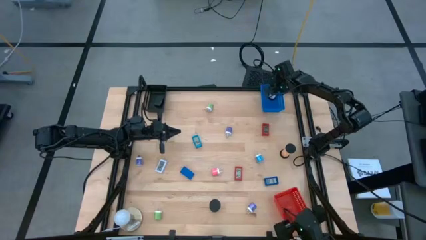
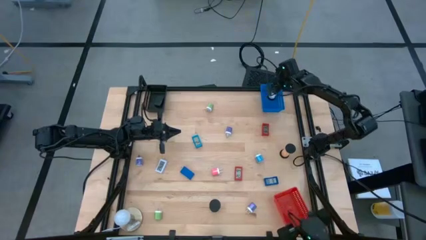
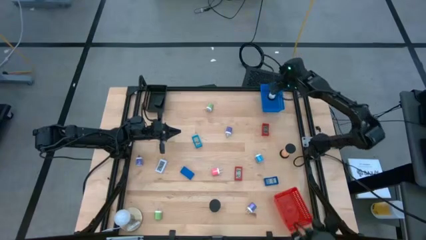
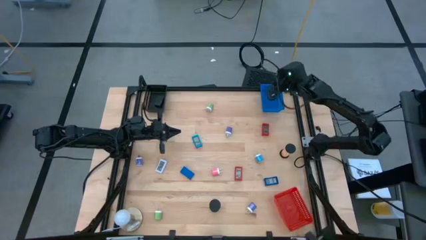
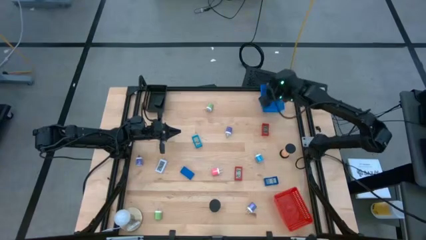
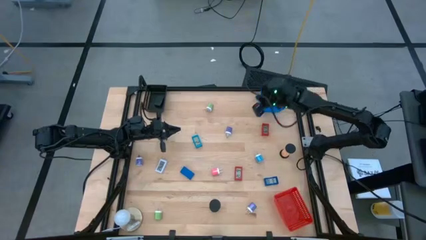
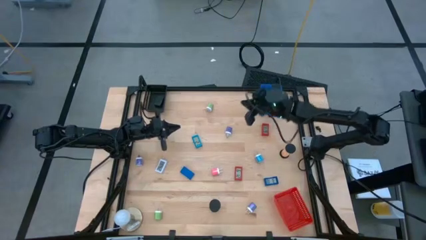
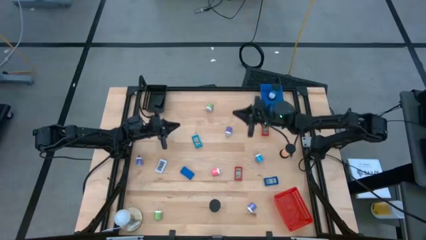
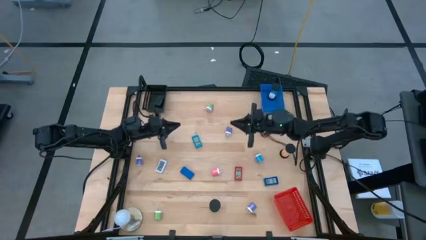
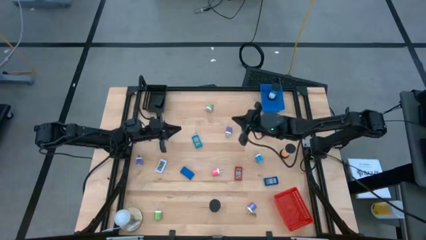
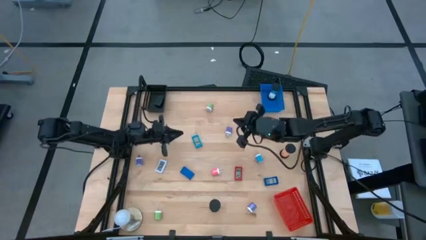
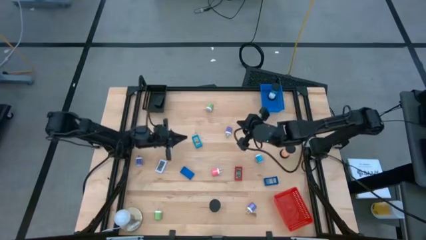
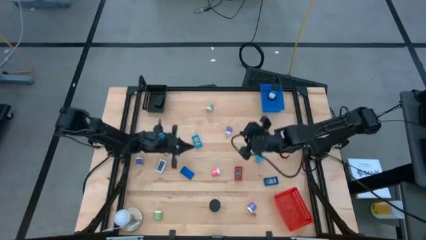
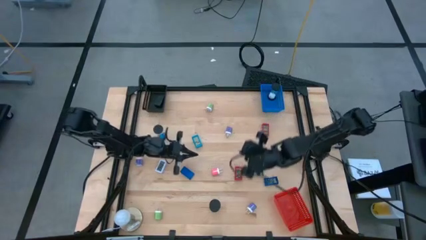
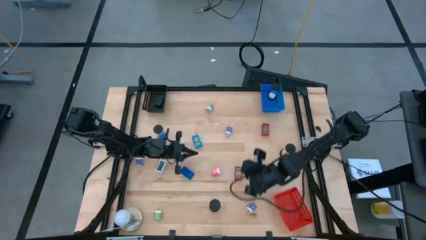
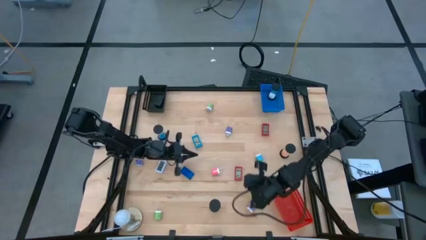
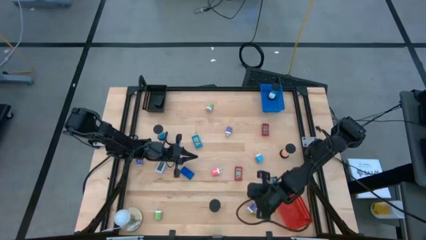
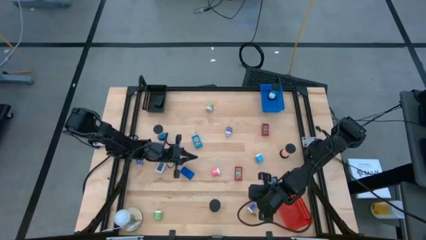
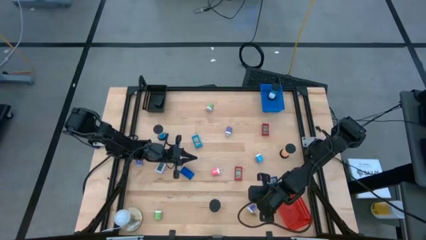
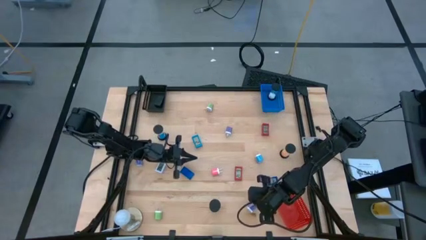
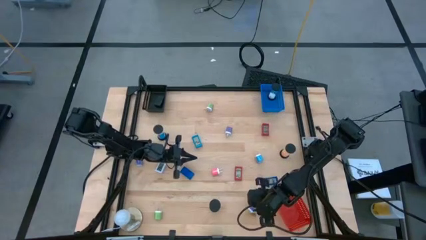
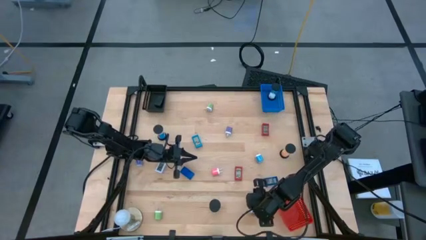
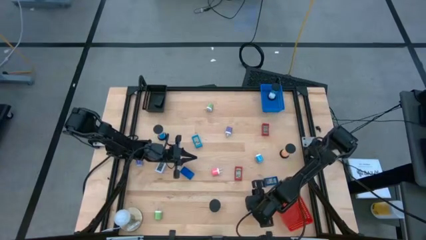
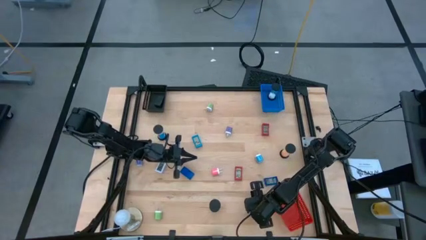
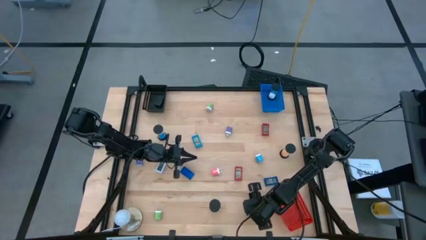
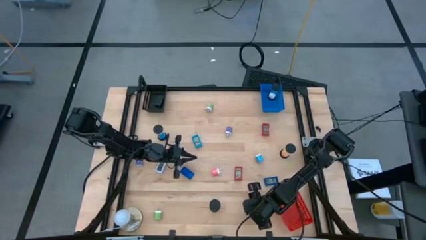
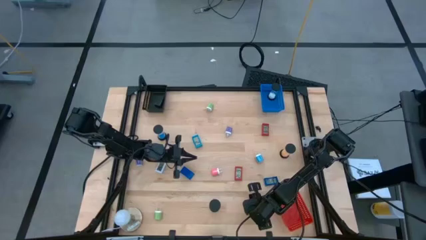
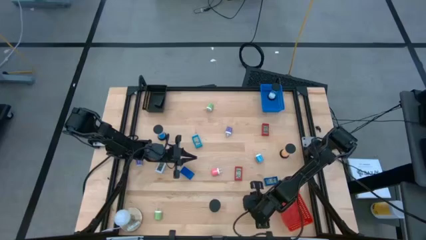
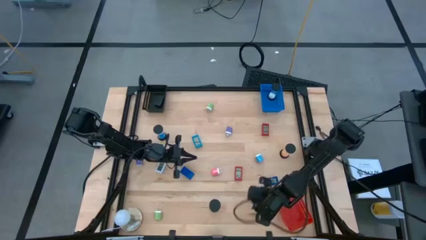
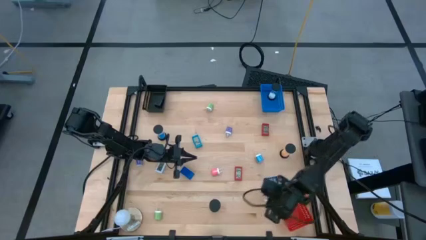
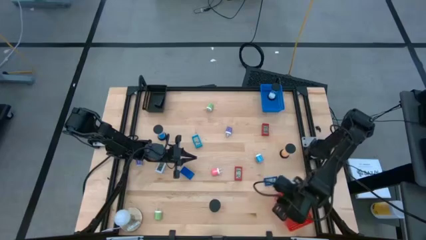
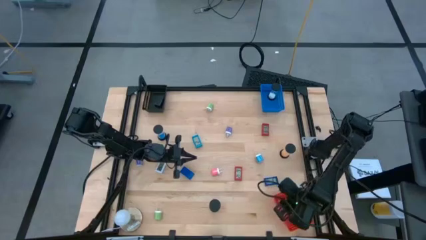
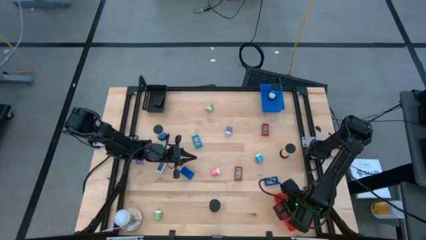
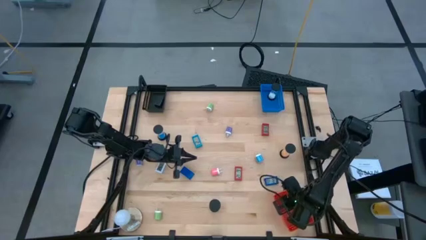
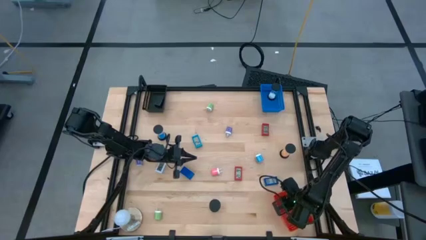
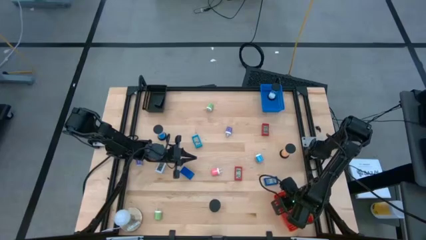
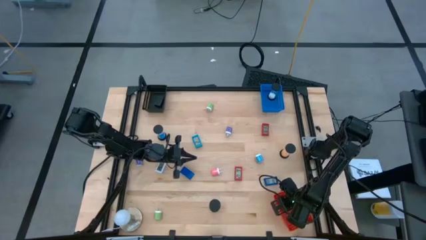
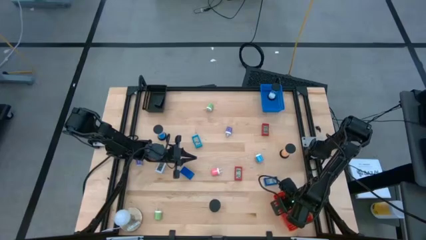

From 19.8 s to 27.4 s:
Task: Pick & Place Office items
Put the bottom right blue charger adapter into the red basket

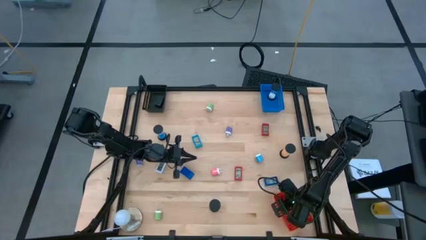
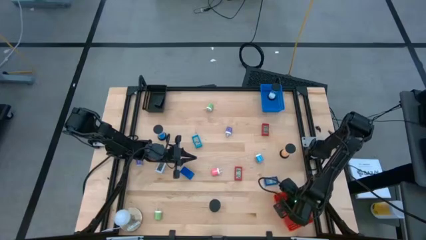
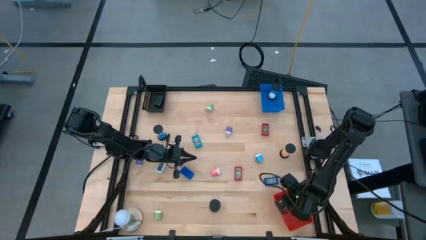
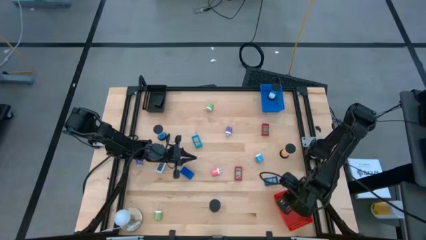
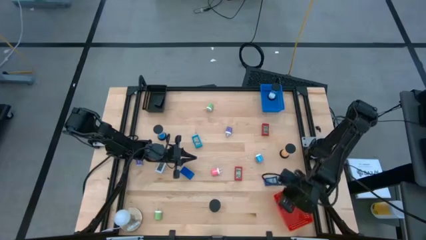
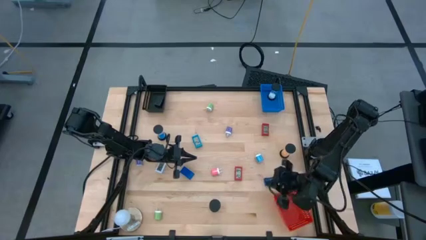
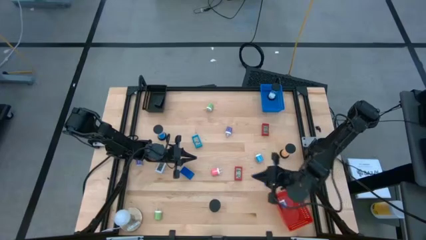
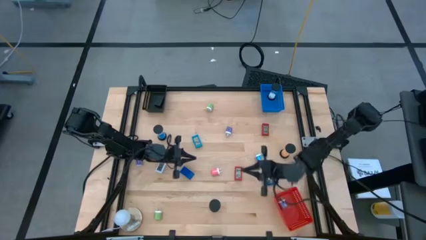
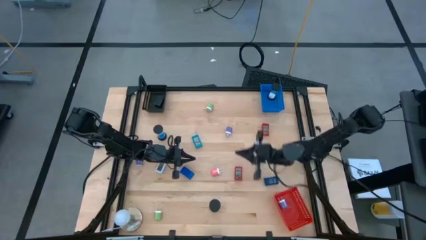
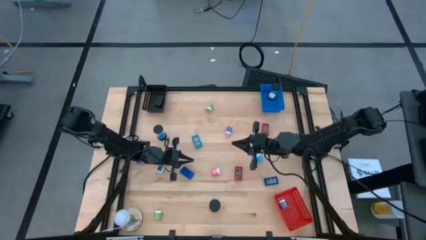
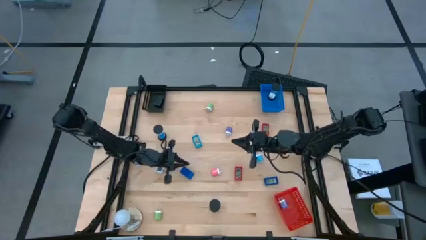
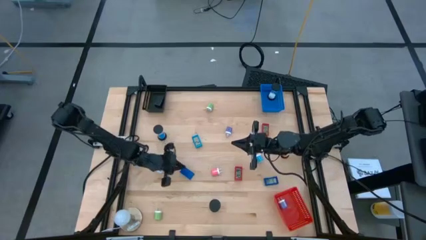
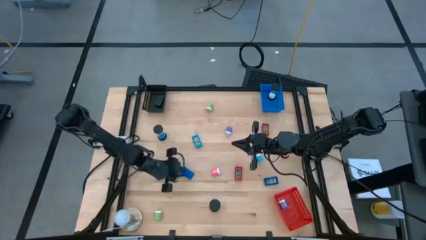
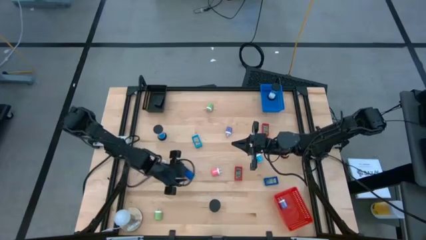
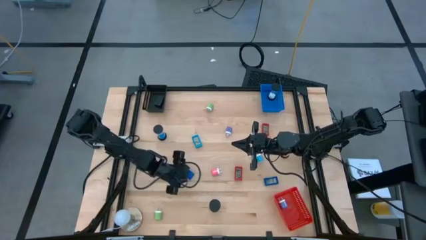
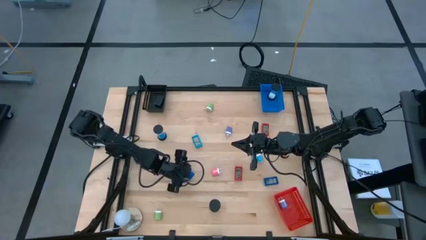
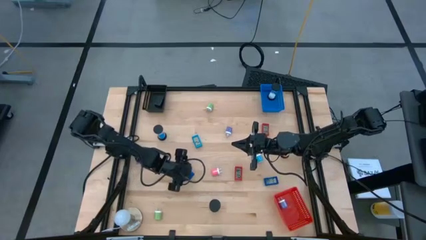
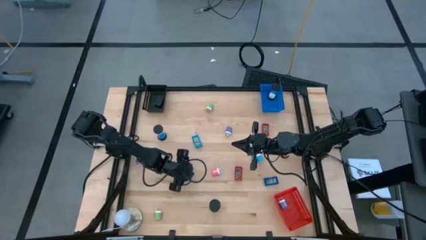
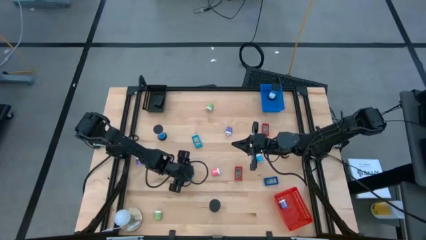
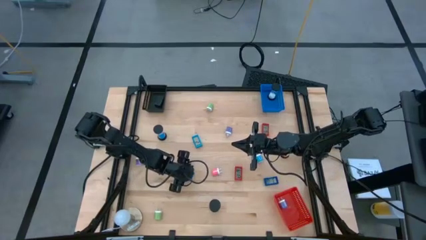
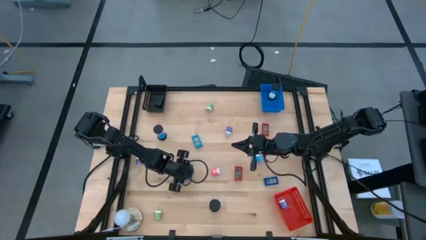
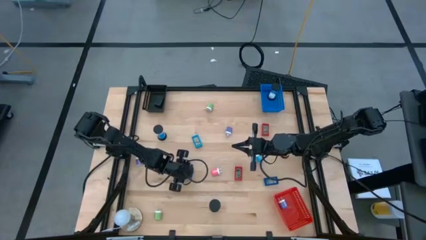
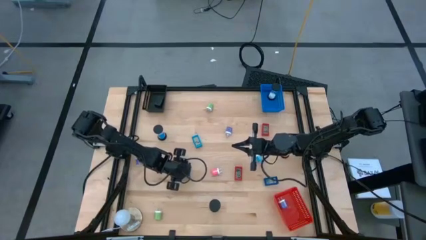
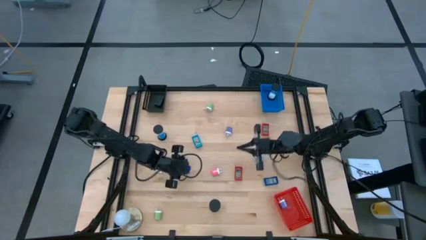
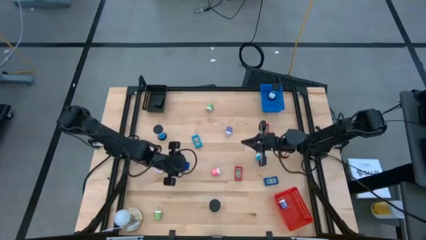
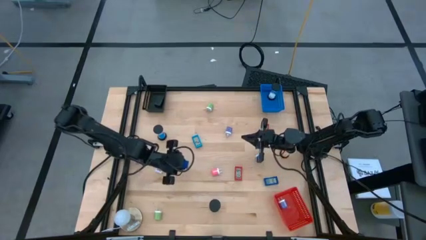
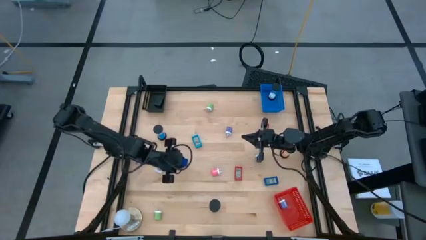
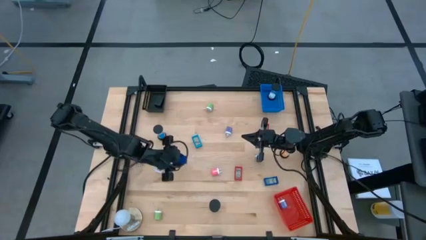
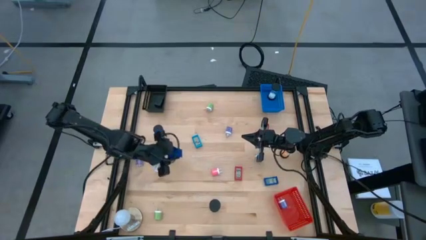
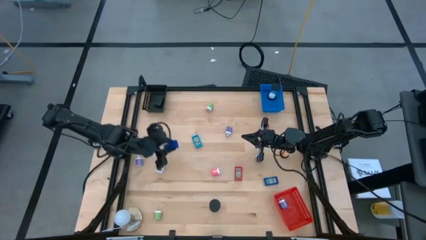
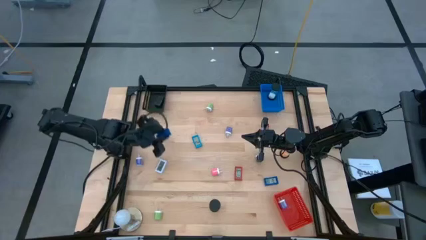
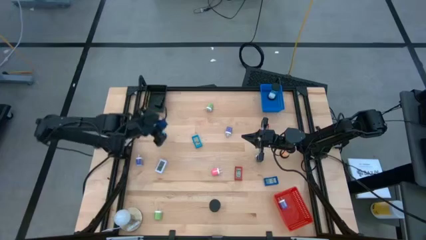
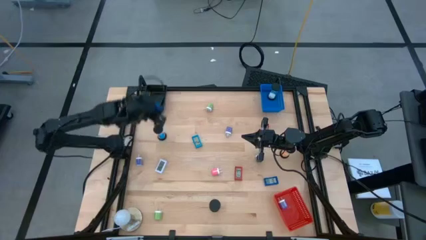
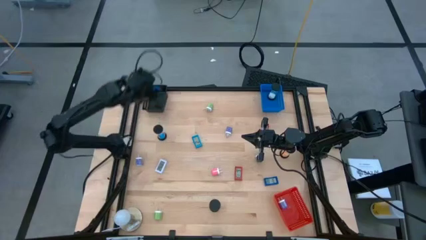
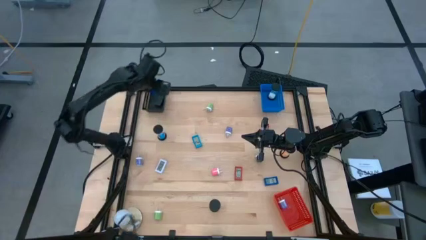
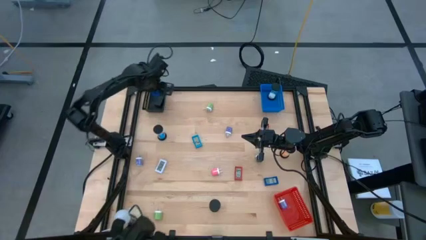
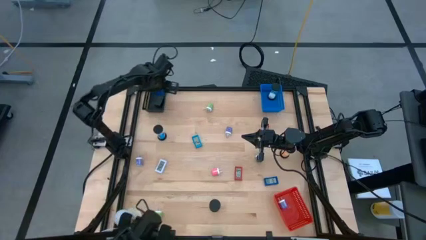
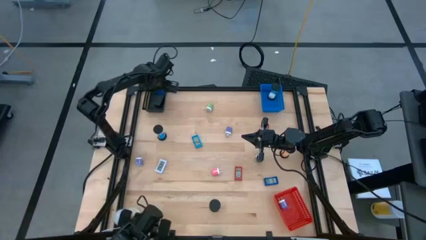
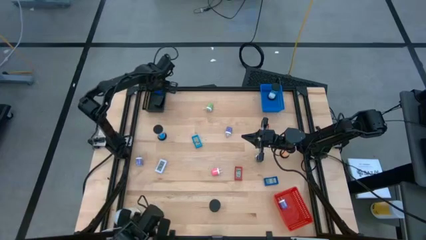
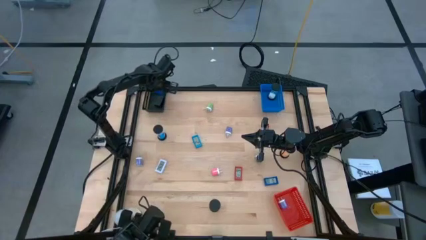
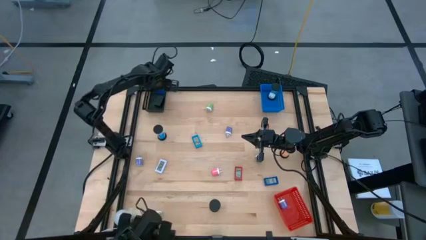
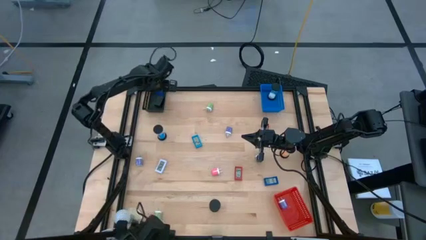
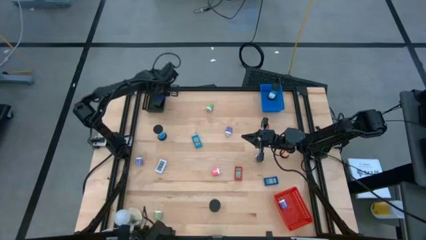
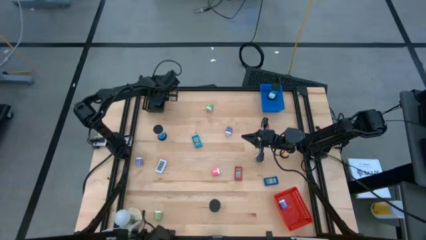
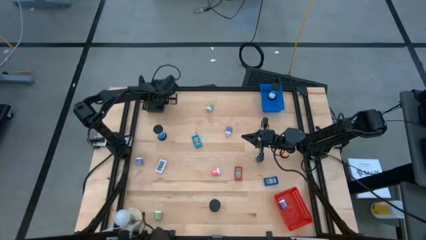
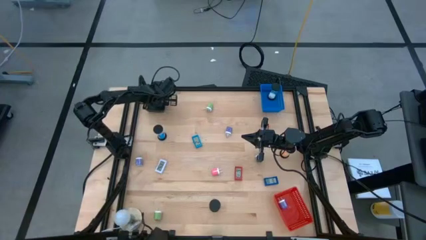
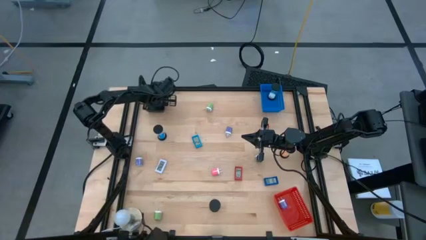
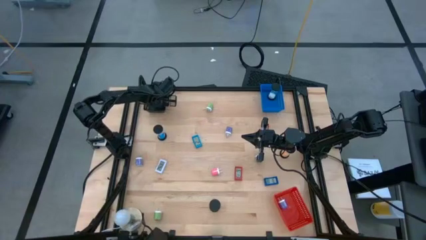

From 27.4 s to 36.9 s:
Put the left blue digital timer into the black basket
